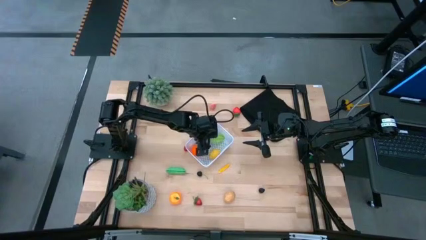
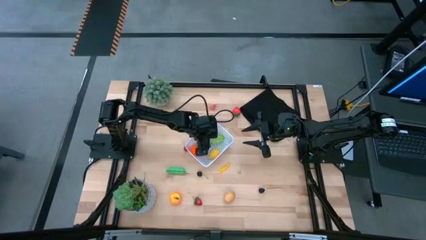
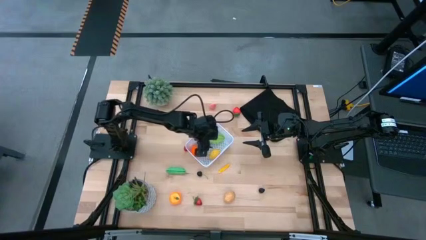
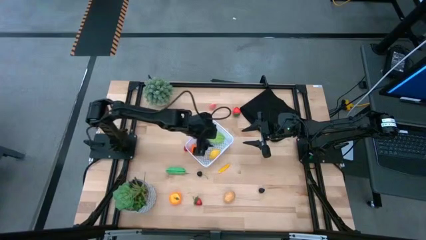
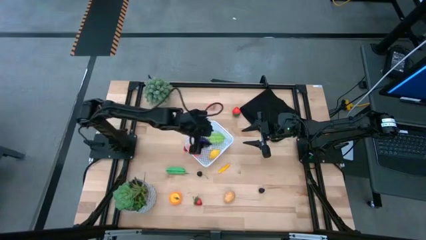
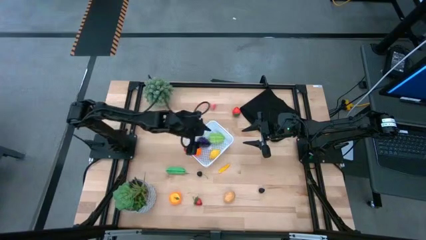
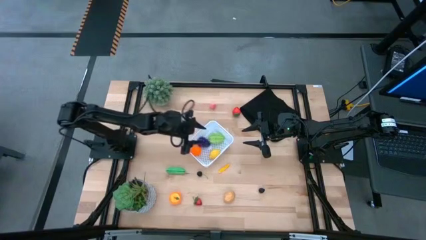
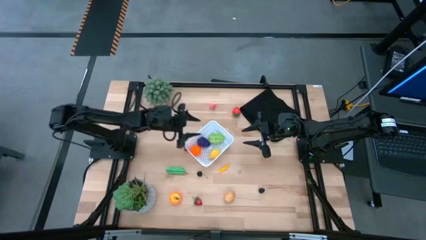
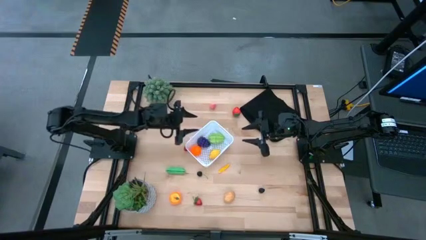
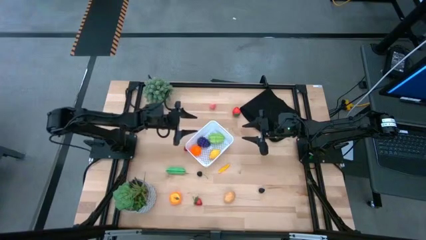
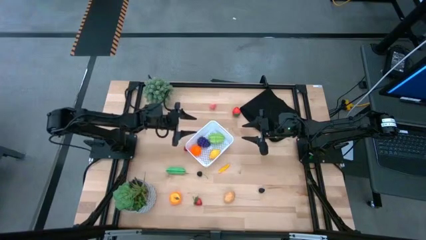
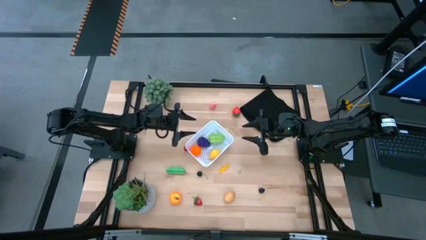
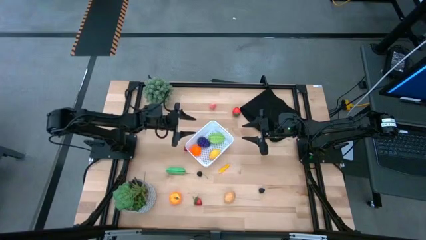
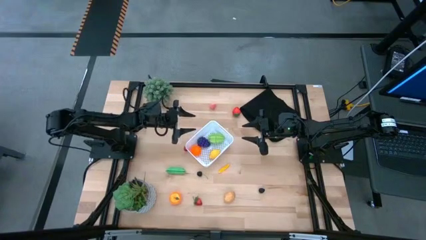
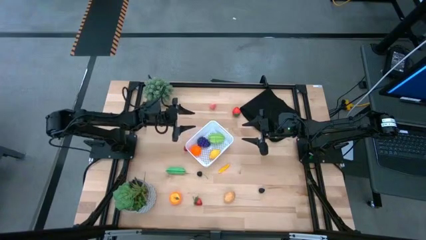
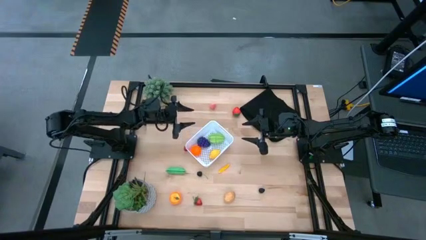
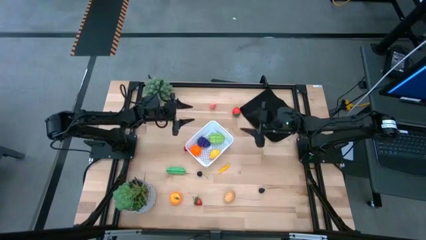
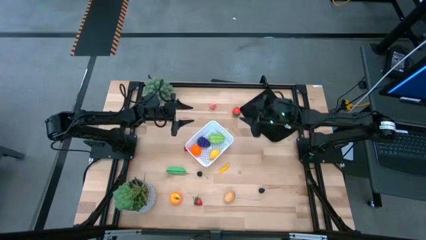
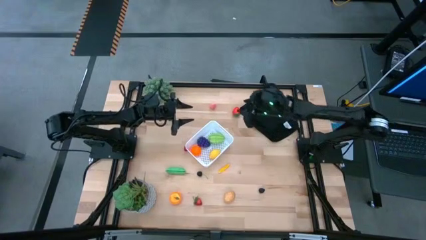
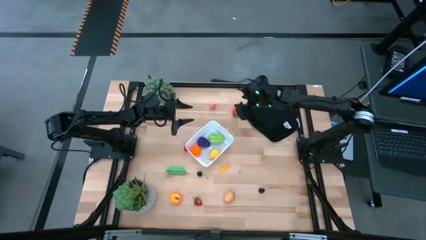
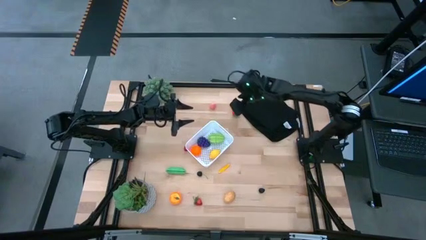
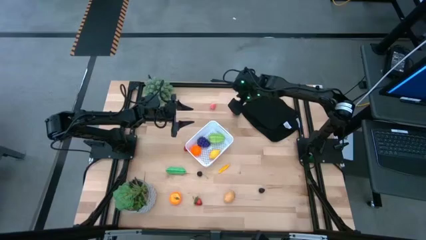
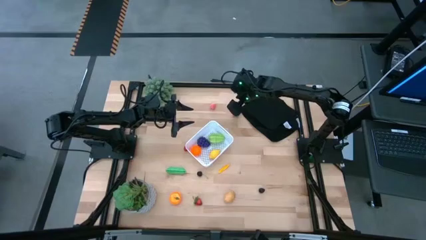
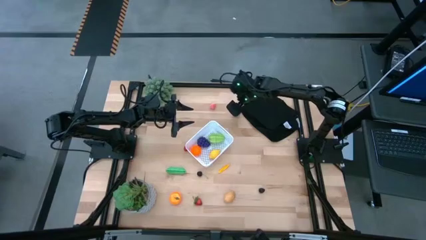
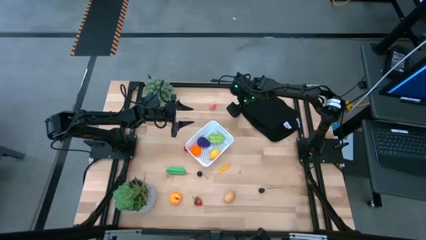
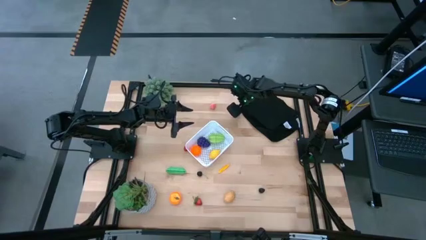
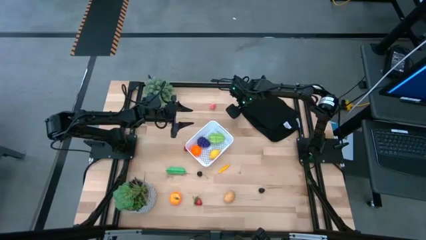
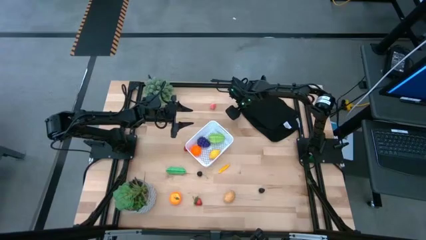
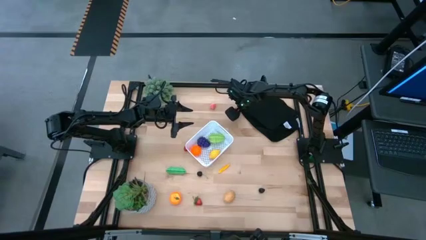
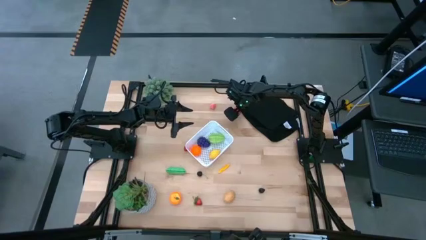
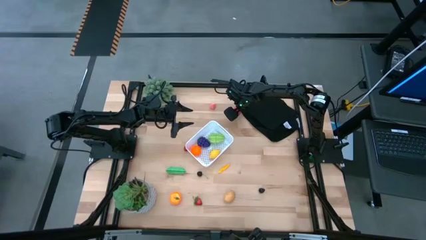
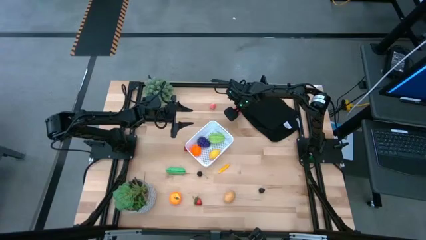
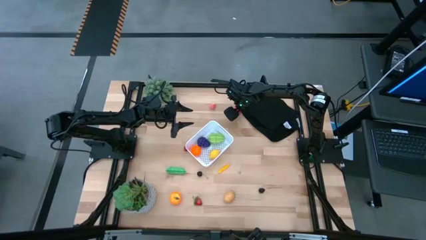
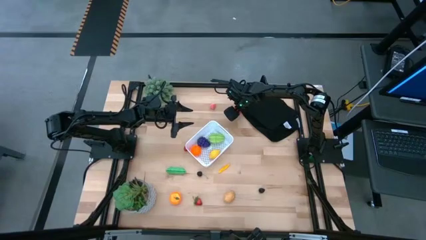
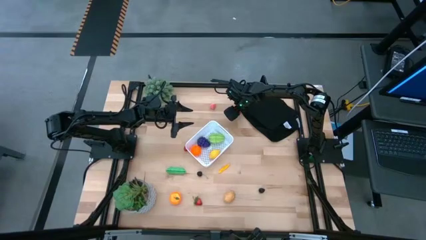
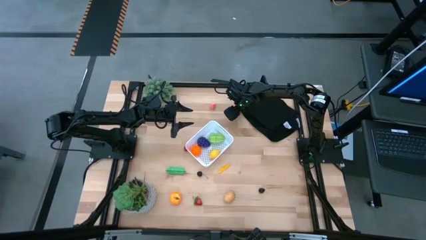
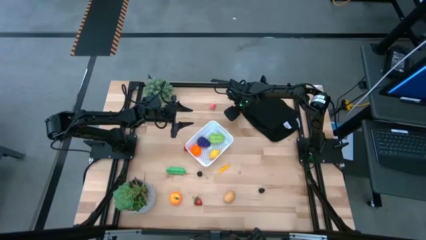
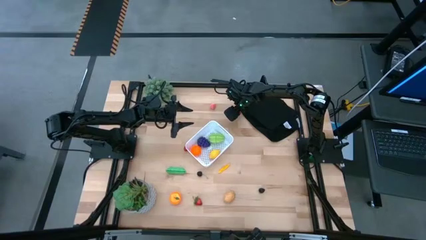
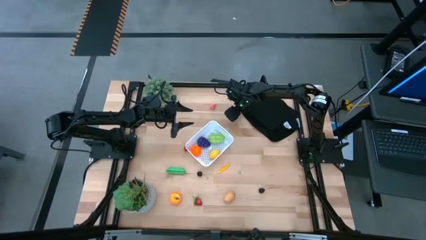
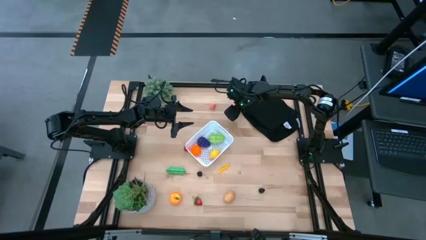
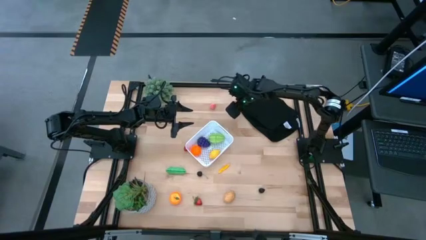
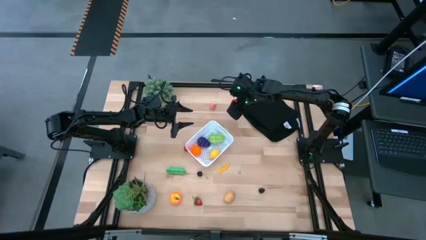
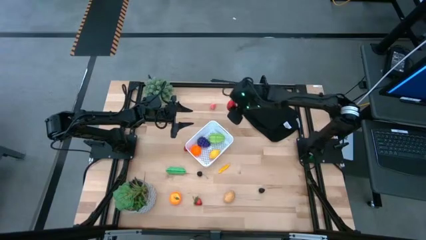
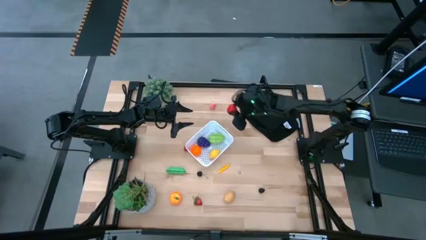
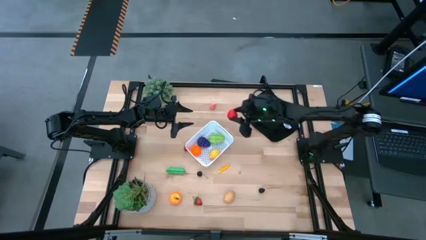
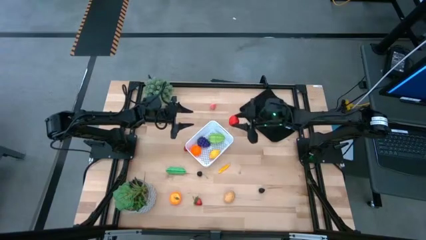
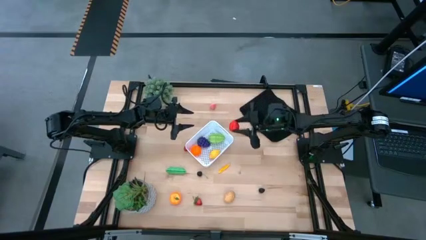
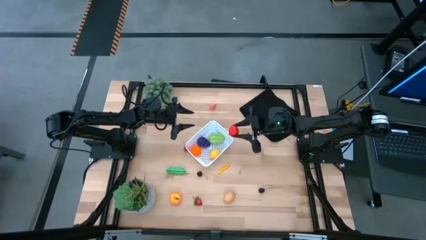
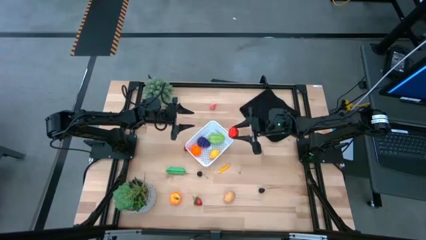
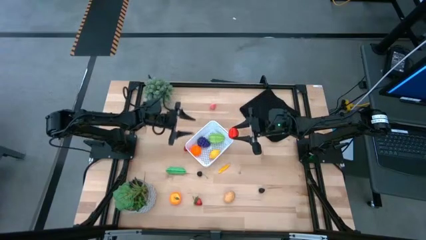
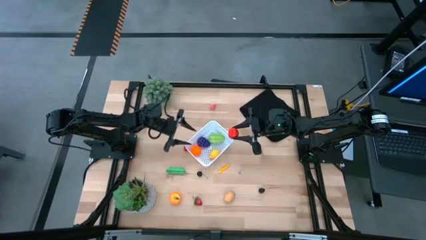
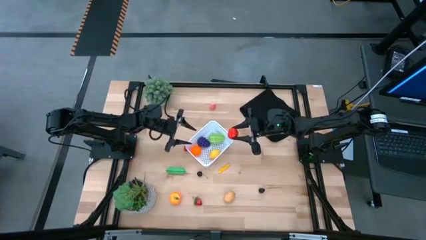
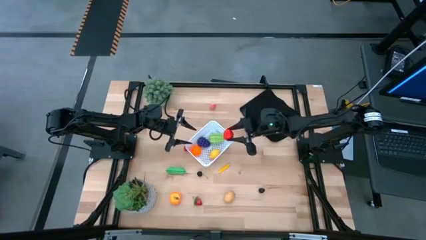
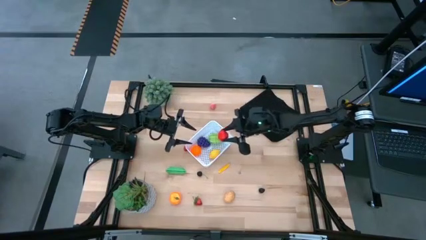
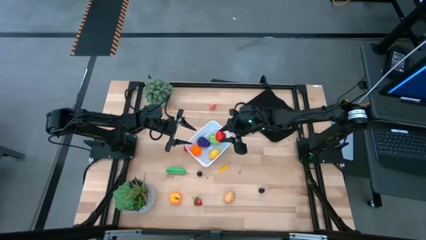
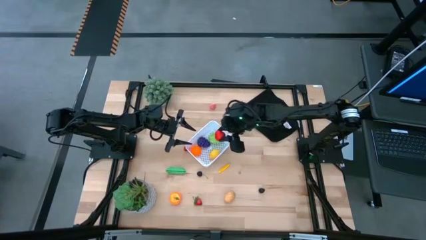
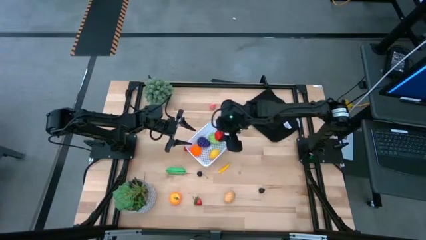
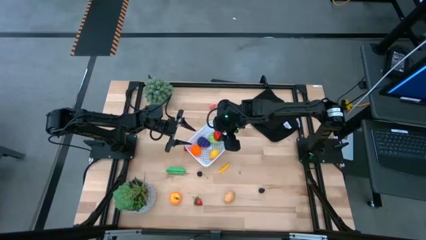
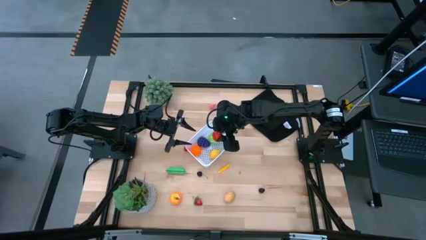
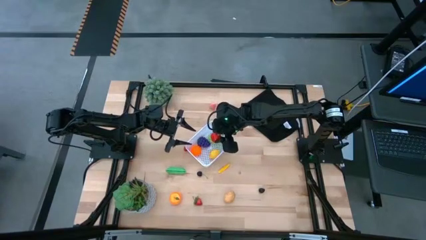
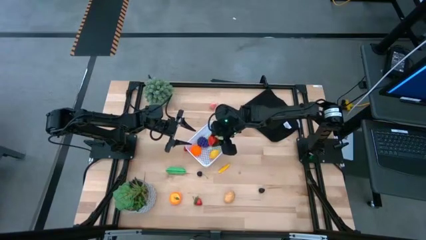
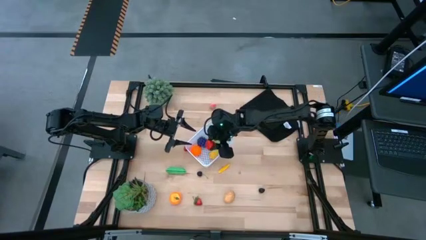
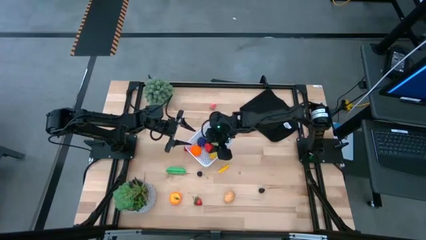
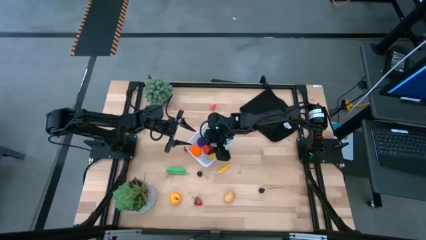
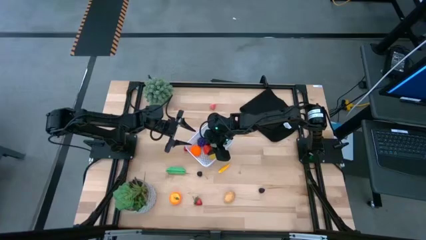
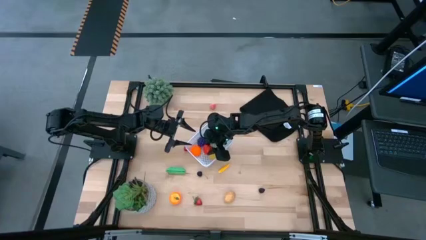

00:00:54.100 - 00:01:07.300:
Task: Pick and placing Produce into tupperware
Put the top strawberry into the white bin

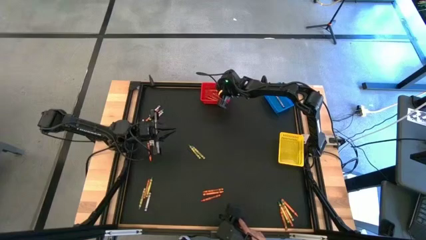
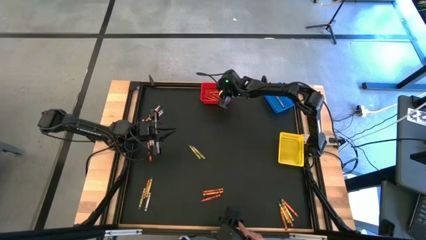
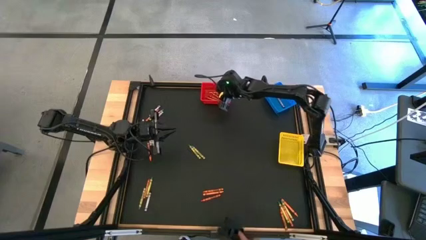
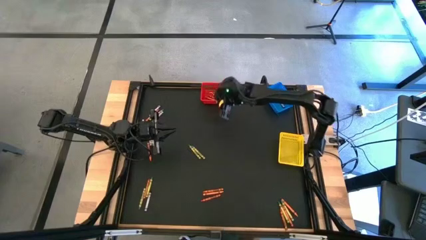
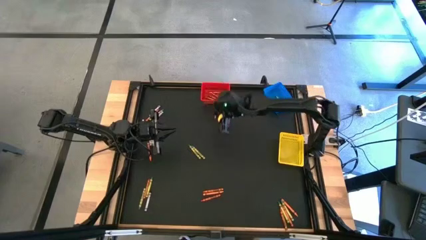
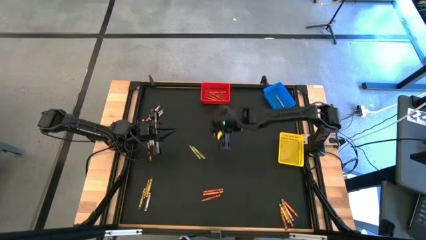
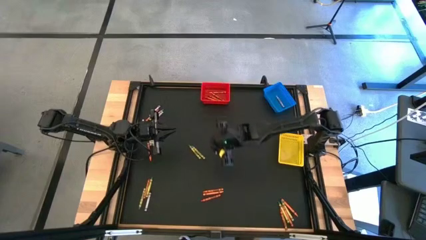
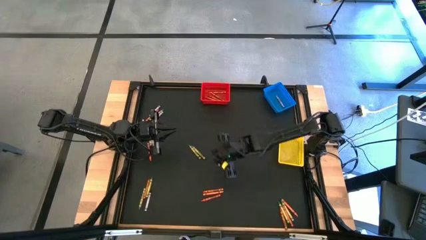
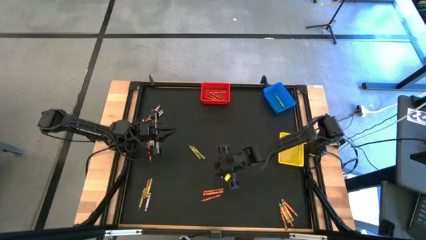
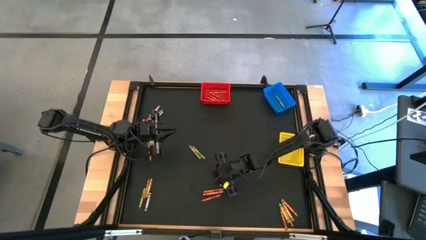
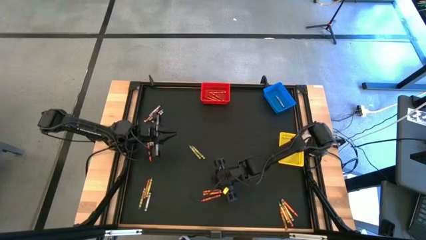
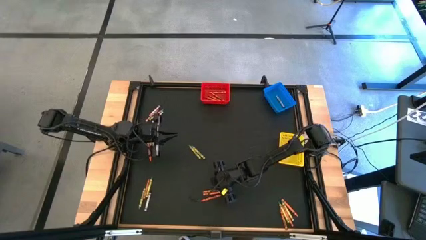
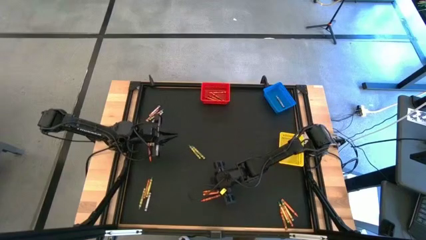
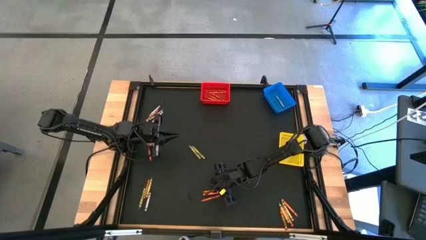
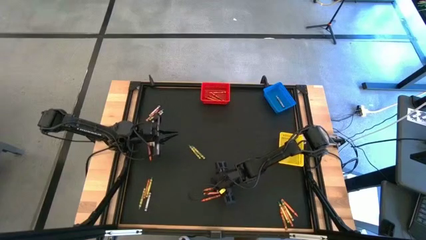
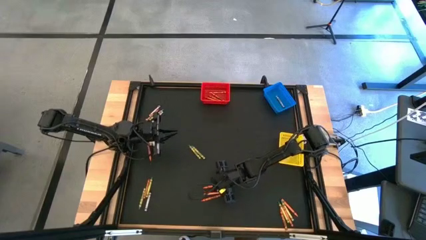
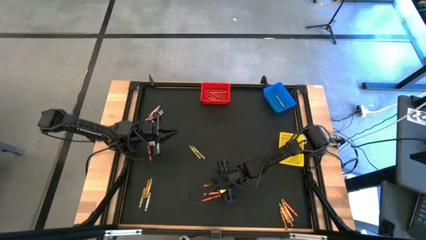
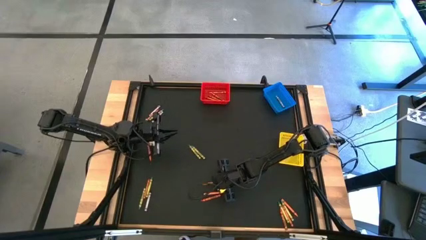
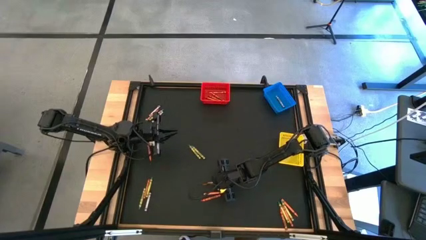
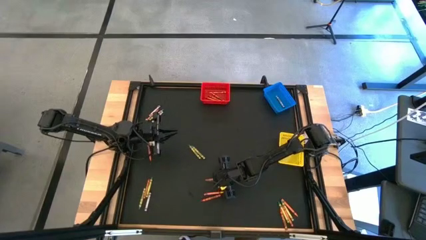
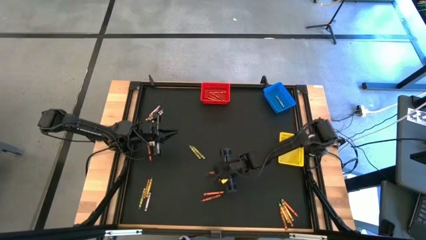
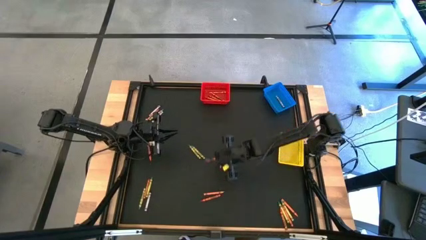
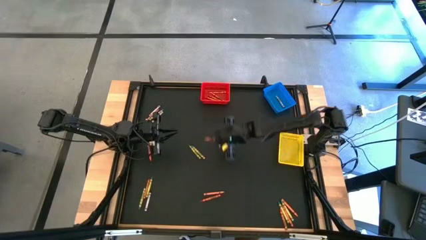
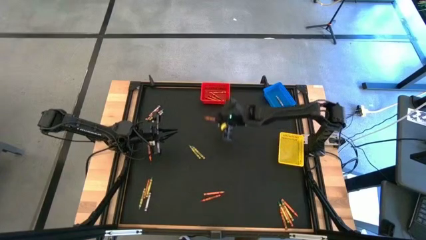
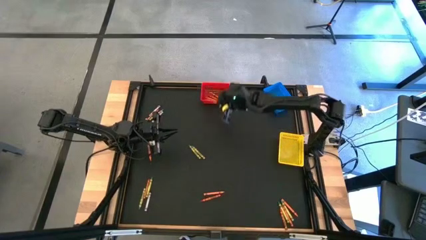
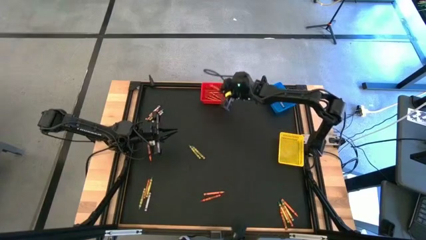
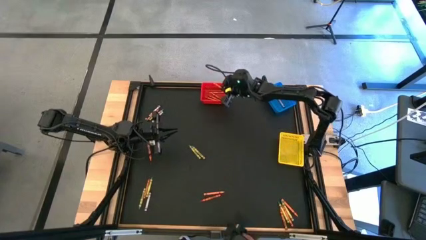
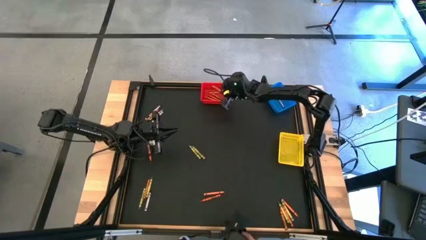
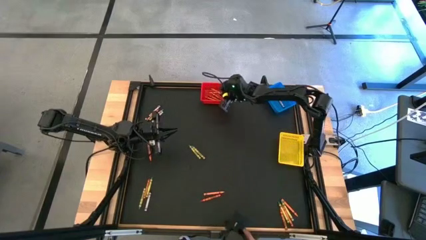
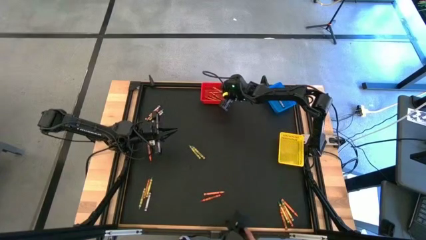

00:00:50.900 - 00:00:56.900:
Task: Sort crayons
Put the orange crayon into the red bin
